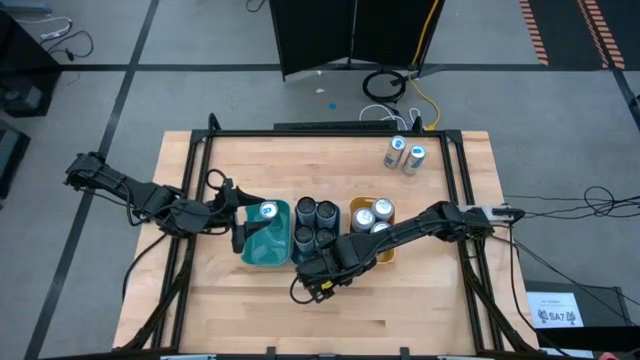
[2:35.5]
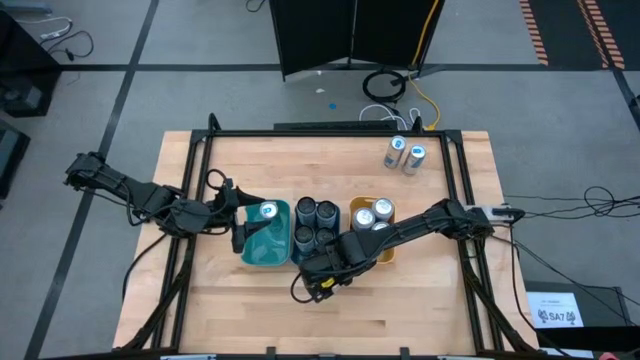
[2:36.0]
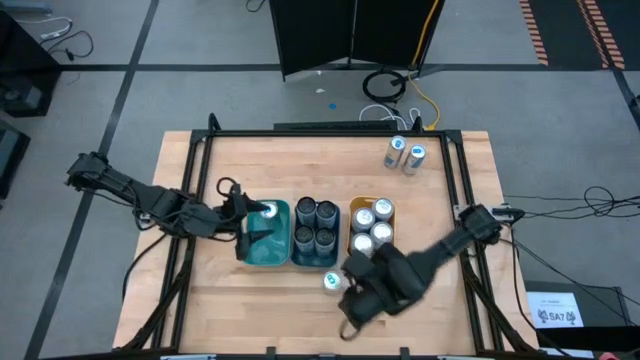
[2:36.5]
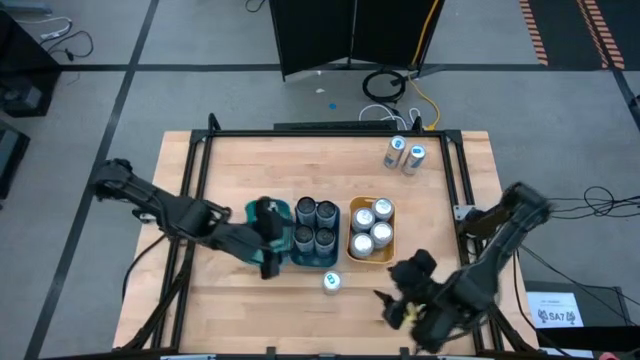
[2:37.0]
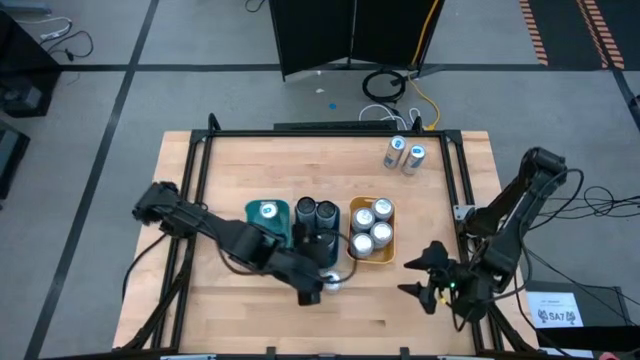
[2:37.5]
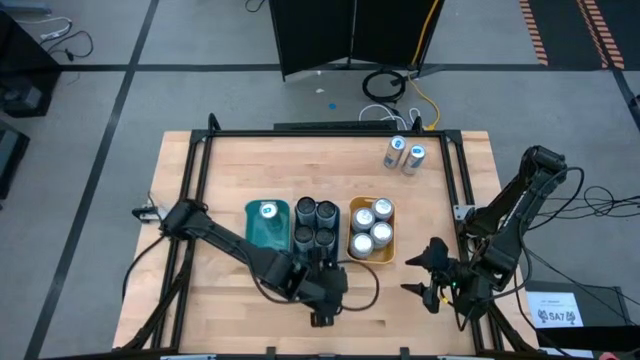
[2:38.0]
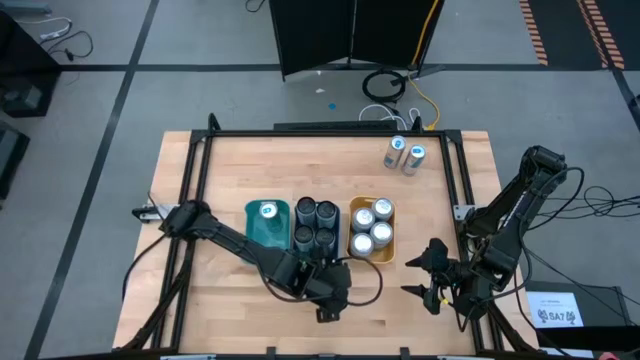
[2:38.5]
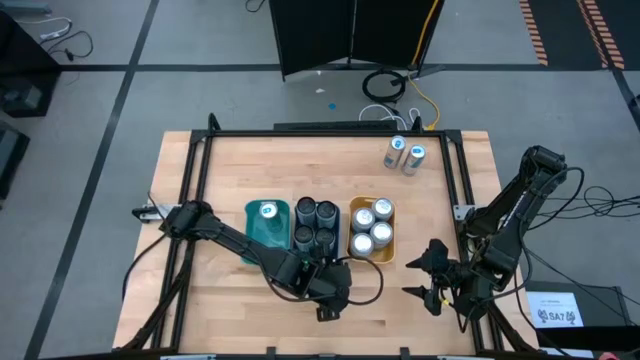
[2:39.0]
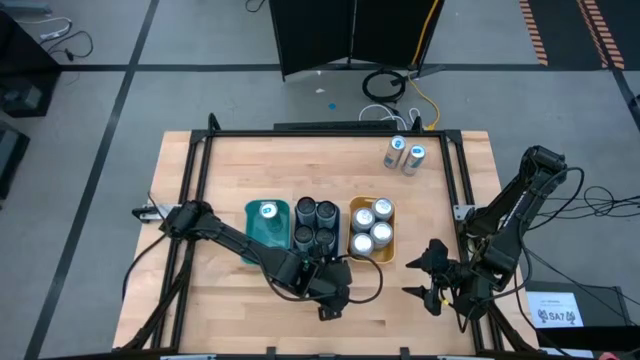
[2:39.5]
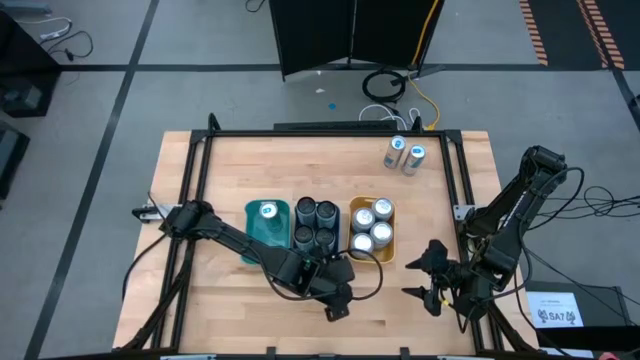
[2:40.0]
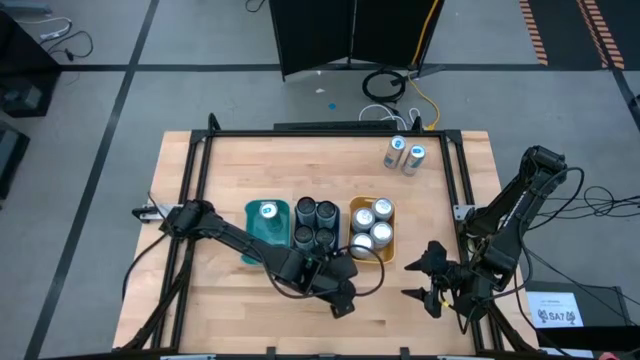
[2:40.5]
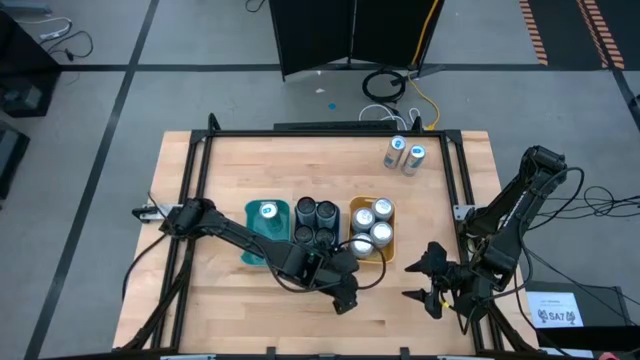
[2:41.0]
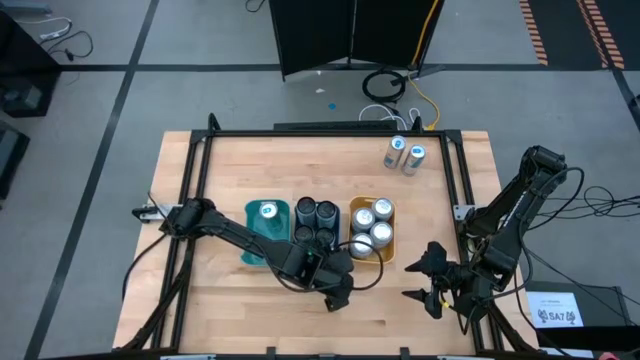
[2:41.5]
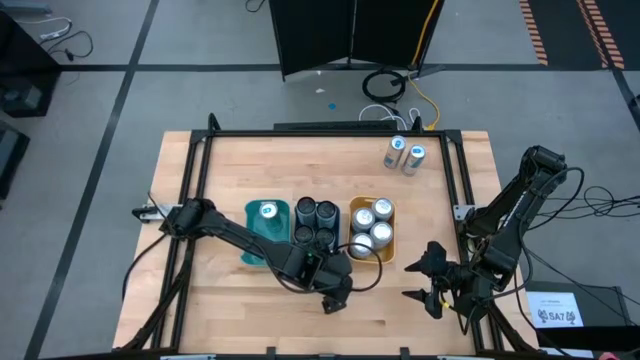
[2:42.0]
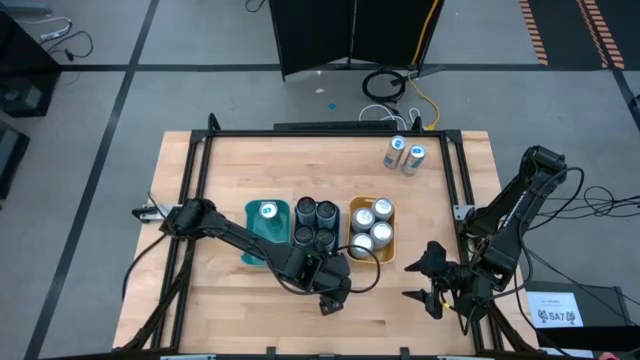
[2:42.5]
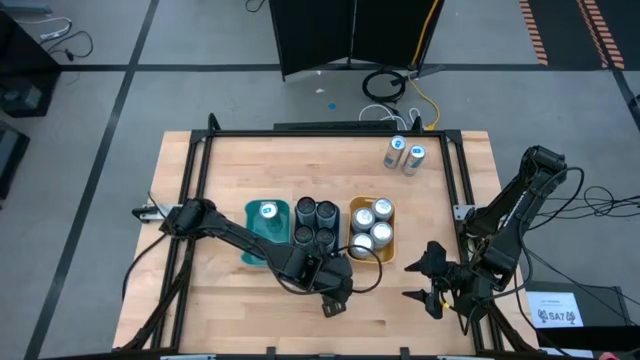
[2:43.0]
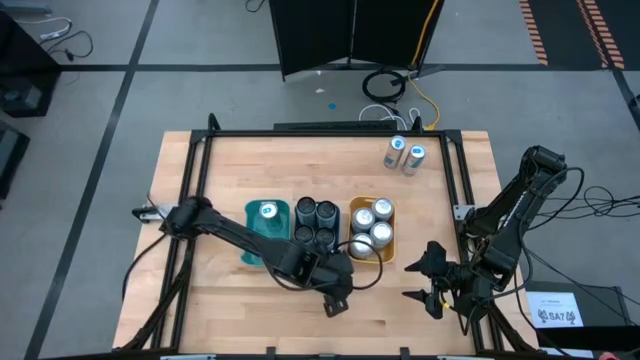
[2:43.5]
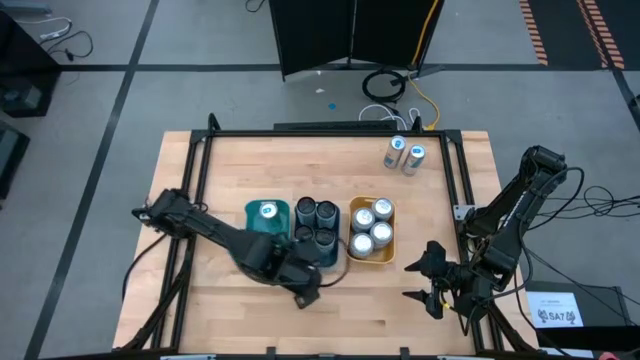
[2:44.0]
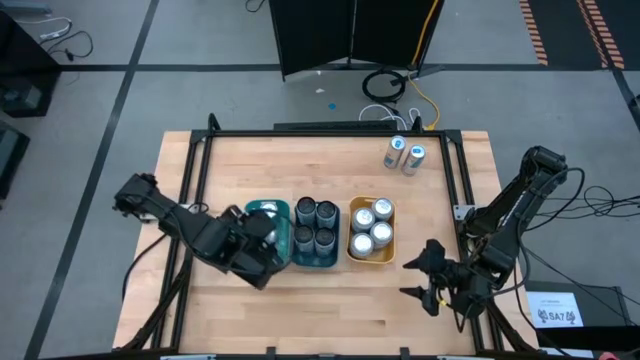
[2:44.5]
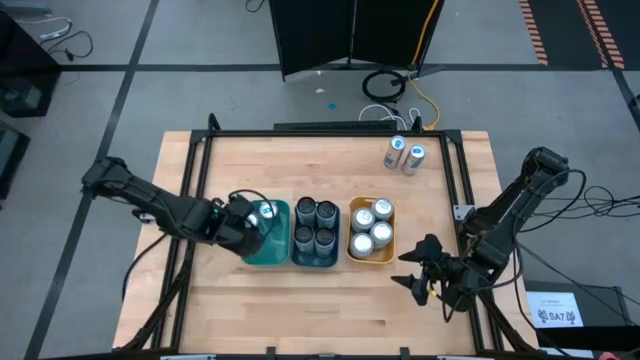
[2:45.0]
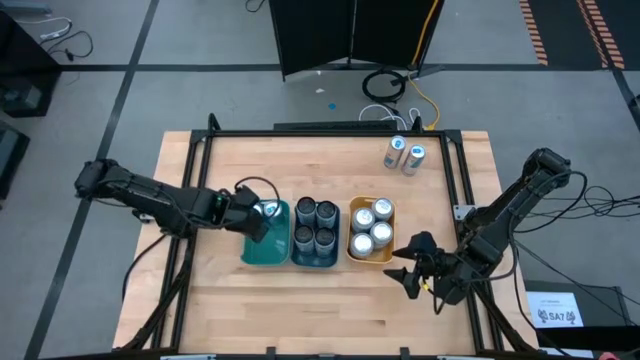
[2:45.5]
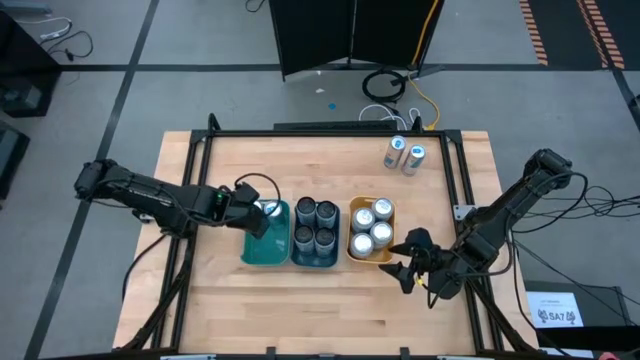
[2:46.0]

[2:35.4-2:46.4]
Task: Sort soda cans
Put the bottom blue soda can into the green bin

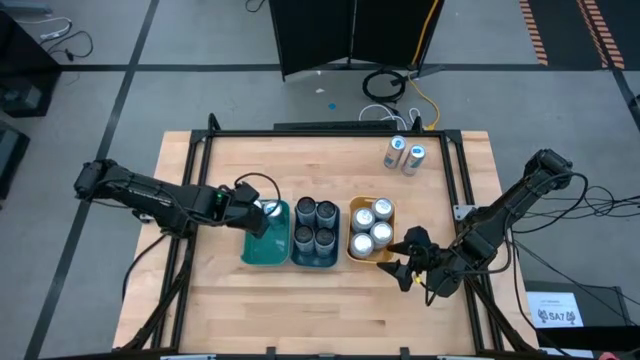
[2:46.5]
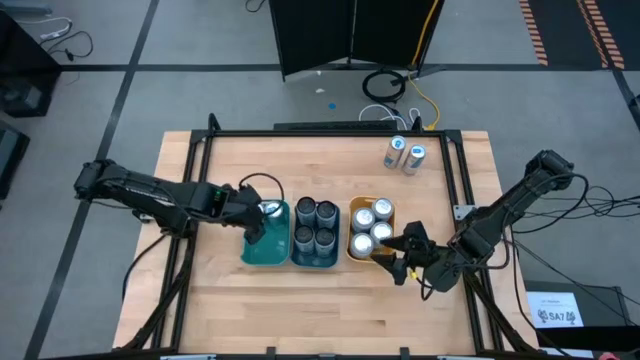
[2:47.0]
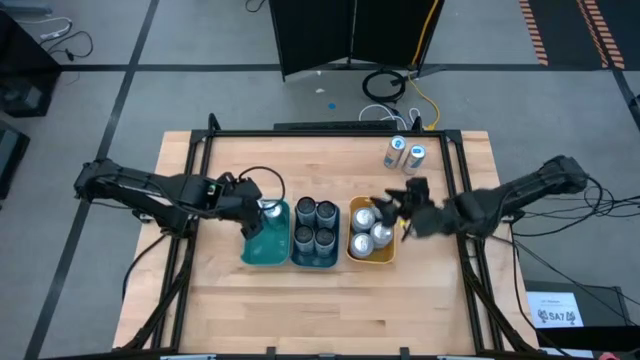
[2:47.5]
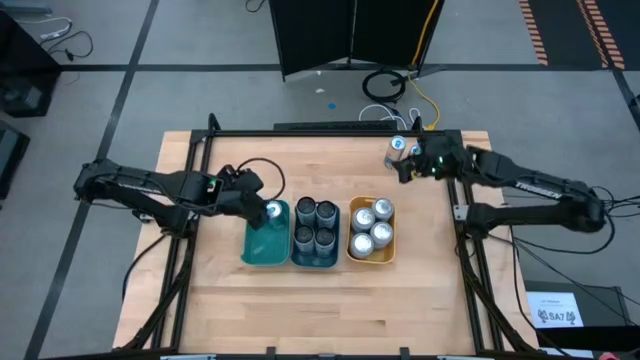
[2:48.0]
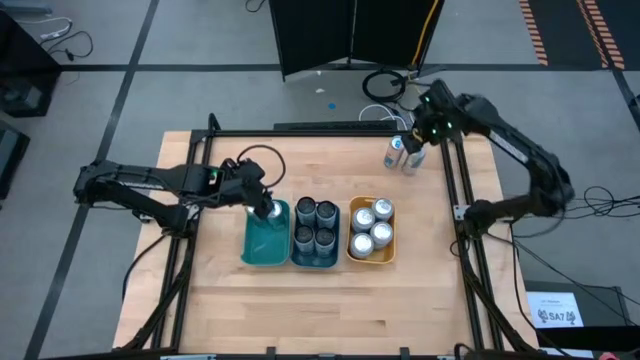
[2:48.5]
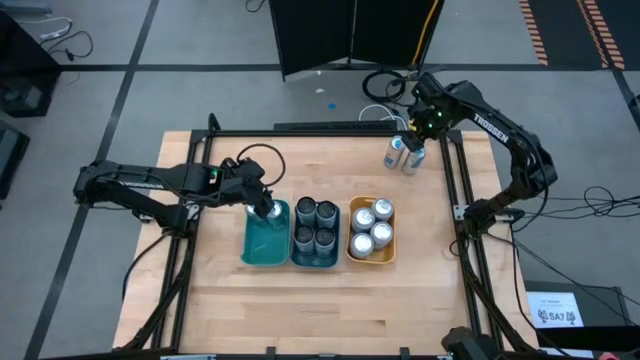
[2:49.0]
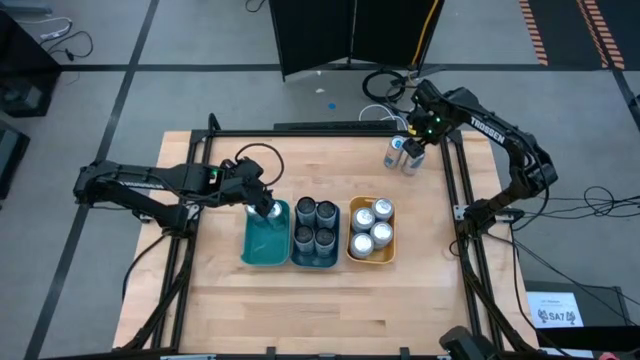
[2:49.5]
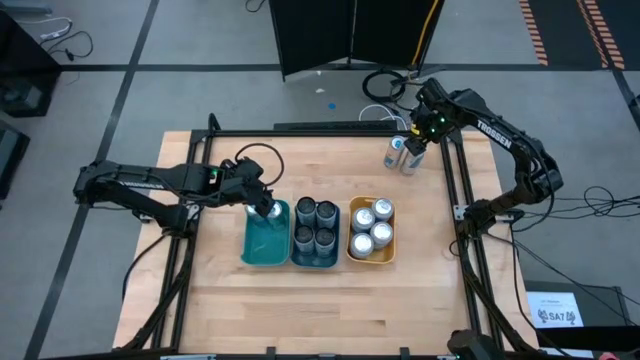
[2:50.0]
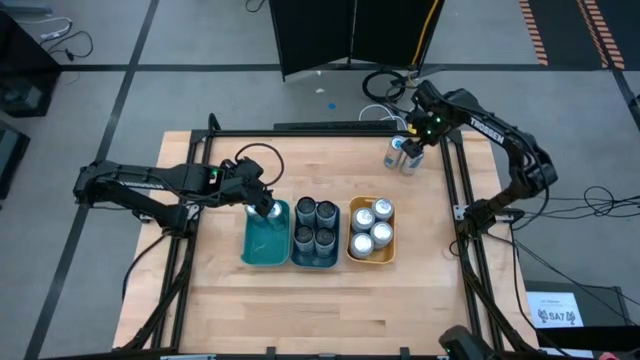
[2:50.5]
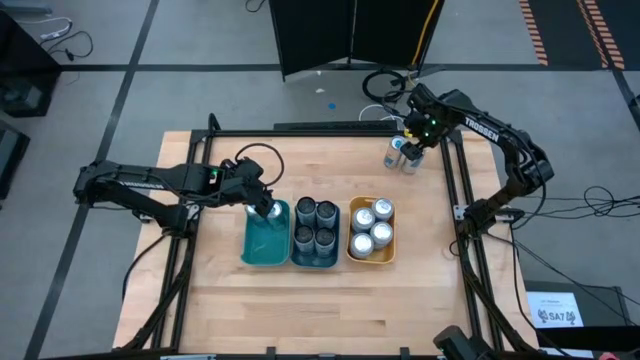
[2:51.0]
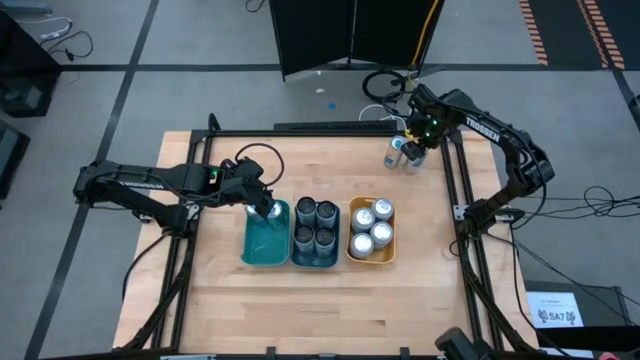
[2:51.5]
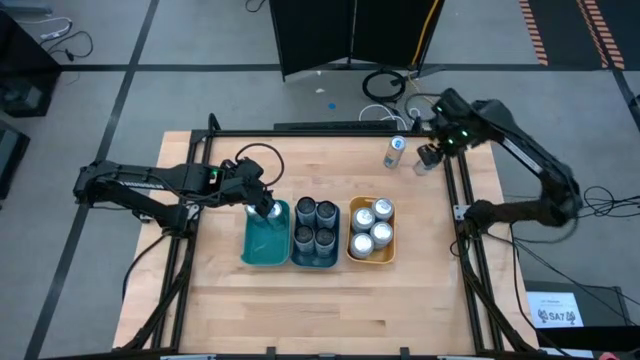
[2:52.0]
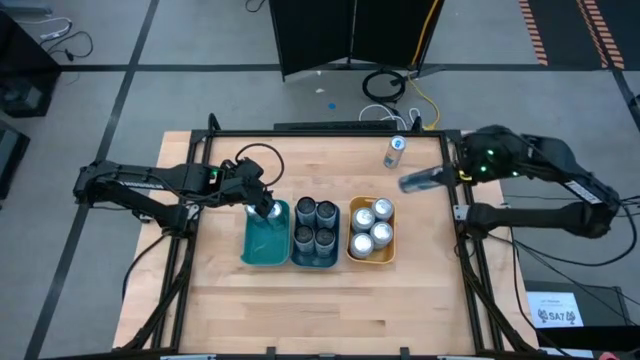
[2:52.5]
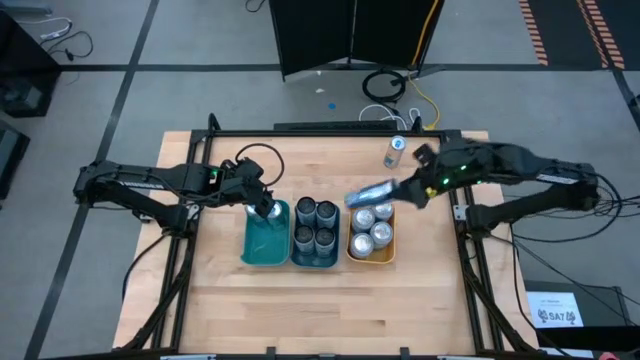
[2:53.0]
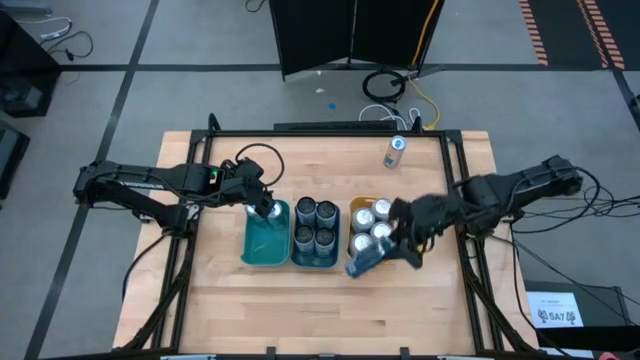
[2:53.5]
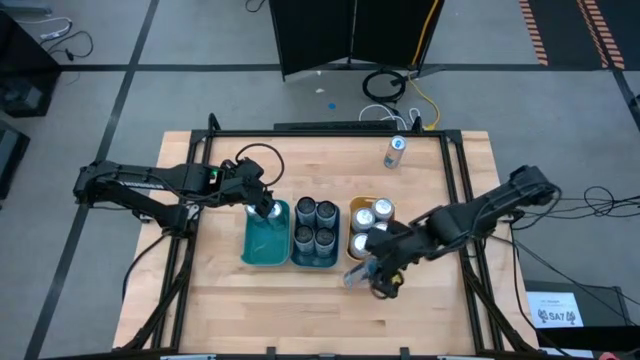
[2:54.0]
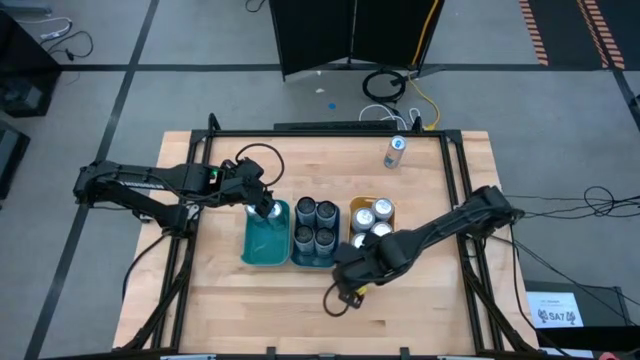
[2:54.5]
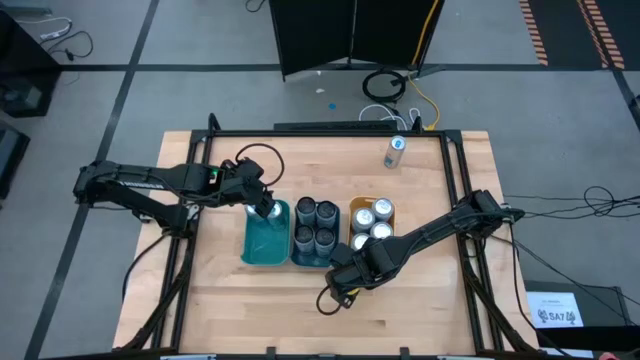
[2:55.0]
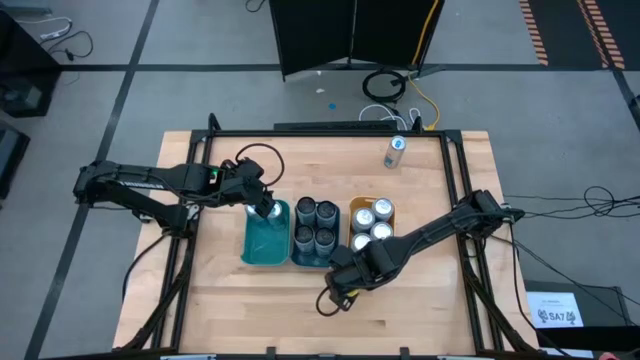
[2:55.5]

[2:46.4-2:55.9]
Move the right blue soda can to the center of the table
